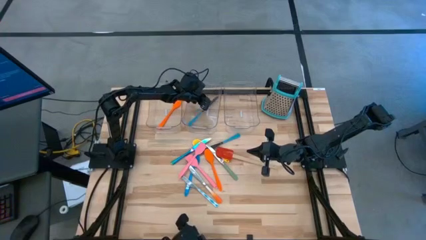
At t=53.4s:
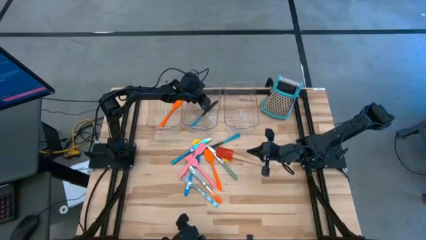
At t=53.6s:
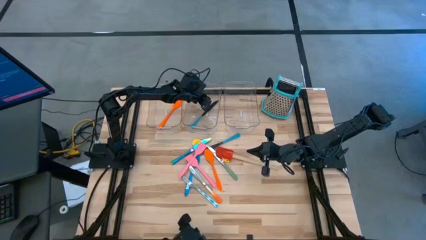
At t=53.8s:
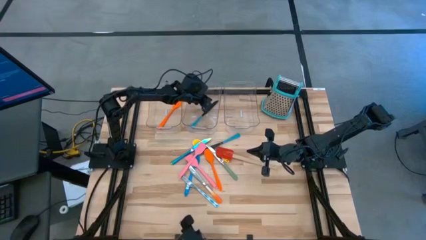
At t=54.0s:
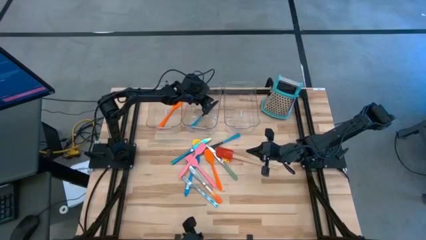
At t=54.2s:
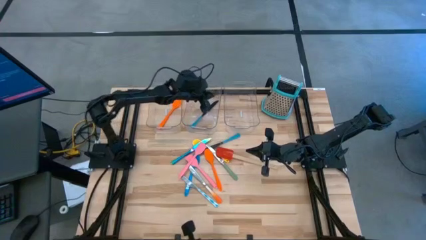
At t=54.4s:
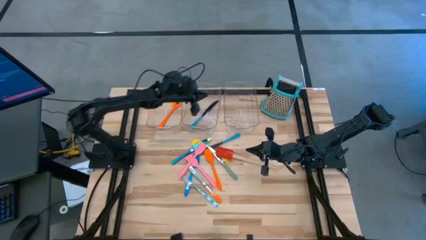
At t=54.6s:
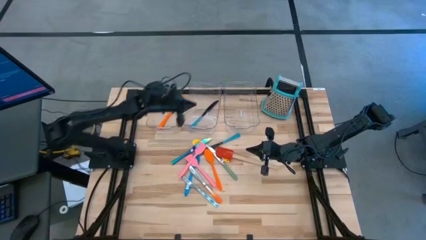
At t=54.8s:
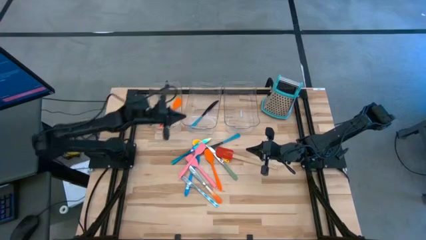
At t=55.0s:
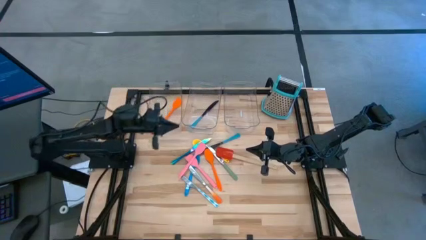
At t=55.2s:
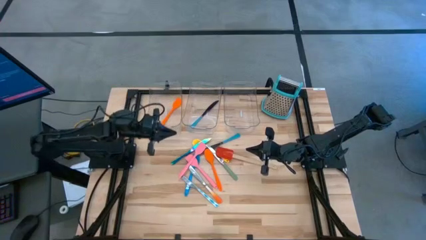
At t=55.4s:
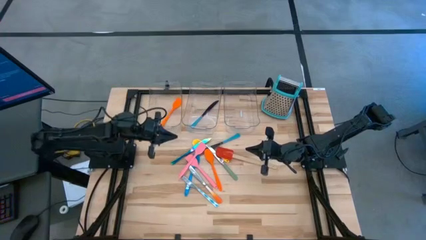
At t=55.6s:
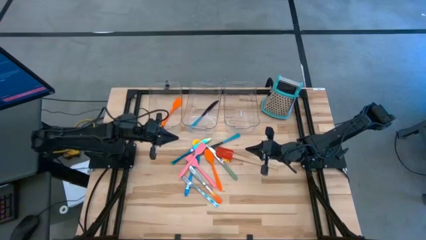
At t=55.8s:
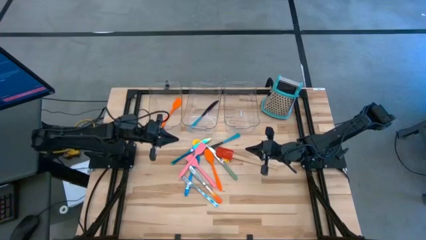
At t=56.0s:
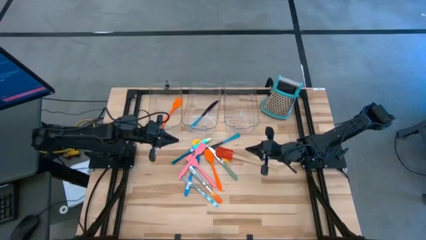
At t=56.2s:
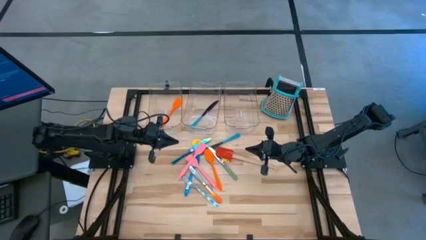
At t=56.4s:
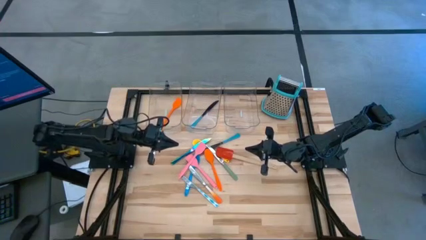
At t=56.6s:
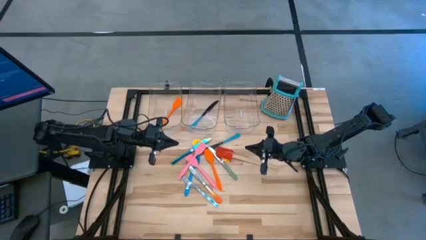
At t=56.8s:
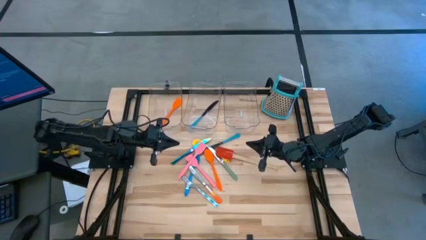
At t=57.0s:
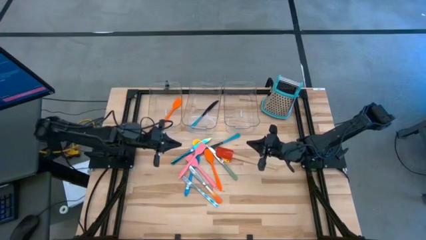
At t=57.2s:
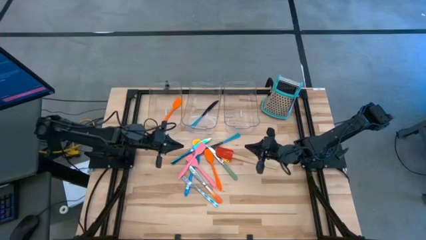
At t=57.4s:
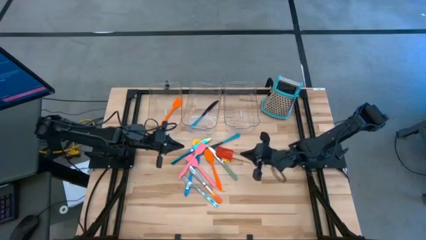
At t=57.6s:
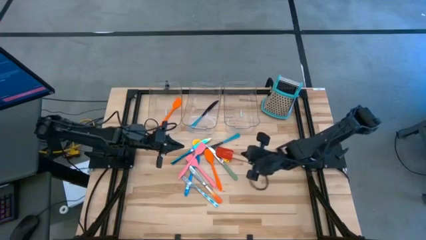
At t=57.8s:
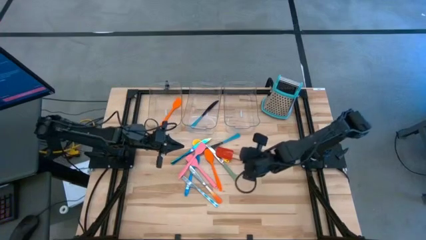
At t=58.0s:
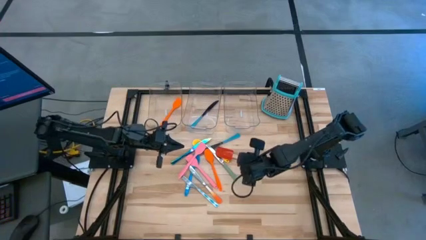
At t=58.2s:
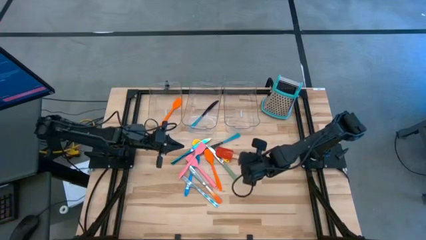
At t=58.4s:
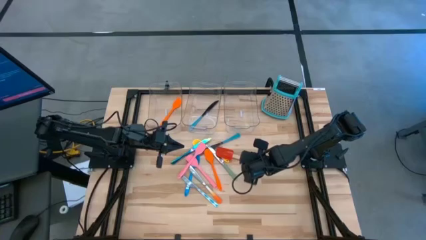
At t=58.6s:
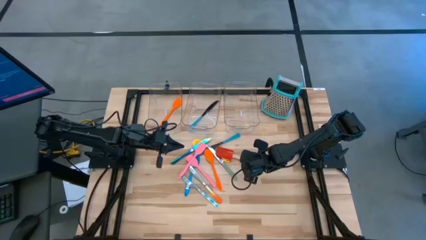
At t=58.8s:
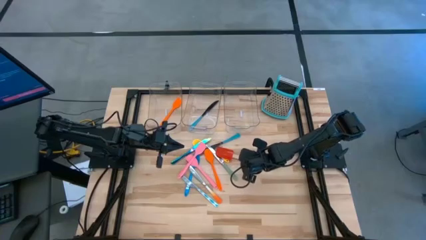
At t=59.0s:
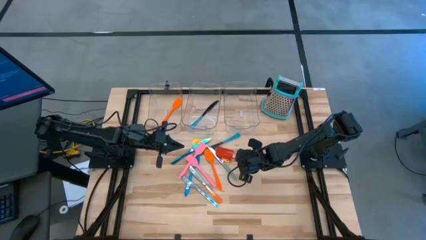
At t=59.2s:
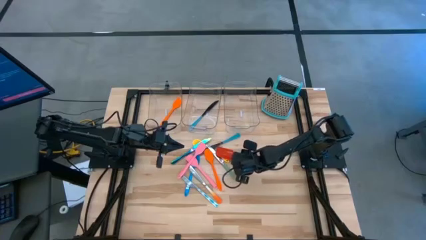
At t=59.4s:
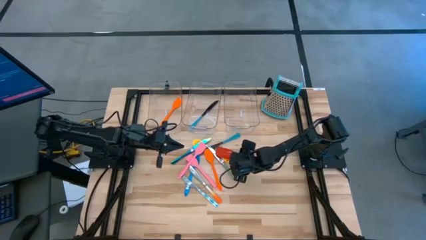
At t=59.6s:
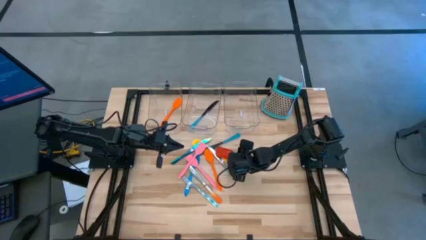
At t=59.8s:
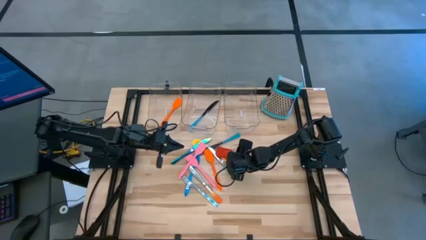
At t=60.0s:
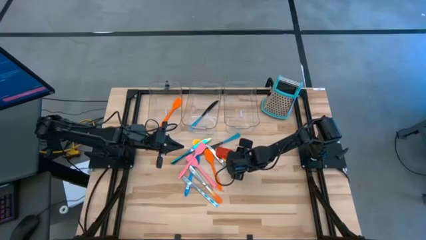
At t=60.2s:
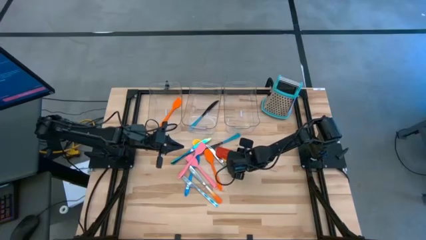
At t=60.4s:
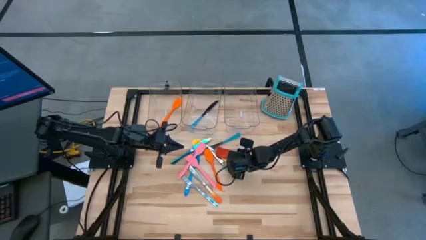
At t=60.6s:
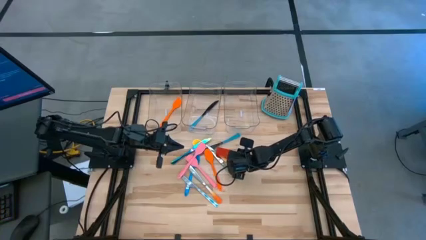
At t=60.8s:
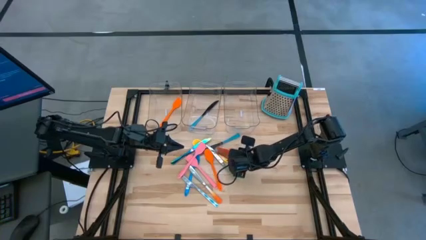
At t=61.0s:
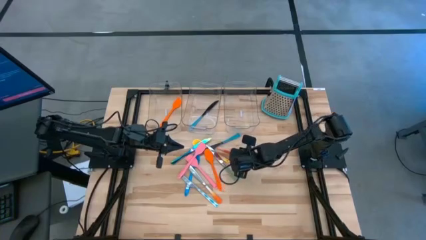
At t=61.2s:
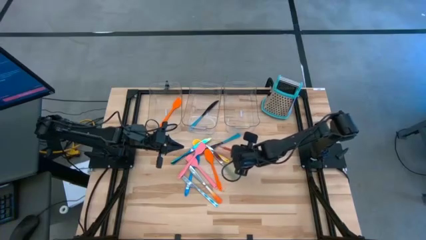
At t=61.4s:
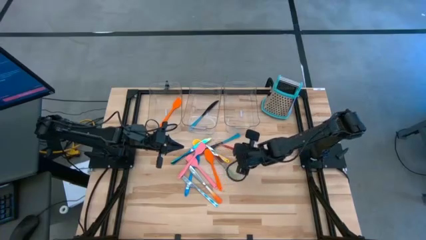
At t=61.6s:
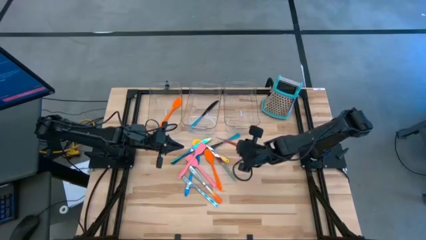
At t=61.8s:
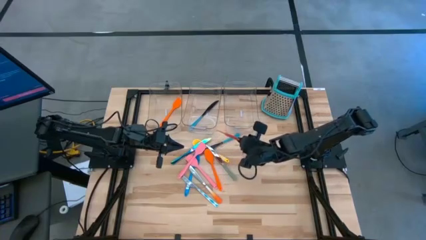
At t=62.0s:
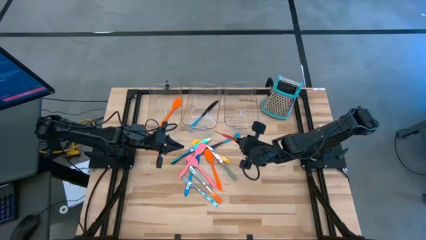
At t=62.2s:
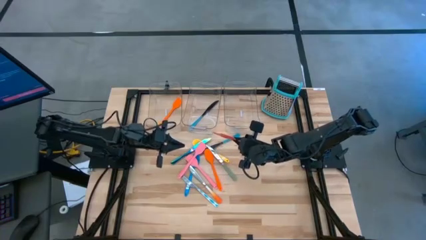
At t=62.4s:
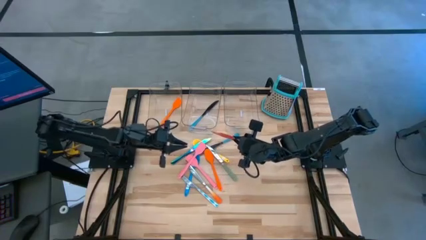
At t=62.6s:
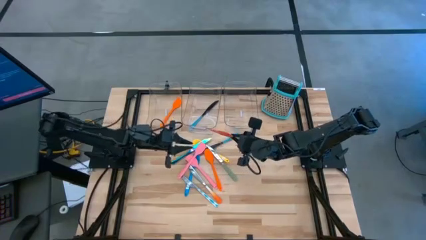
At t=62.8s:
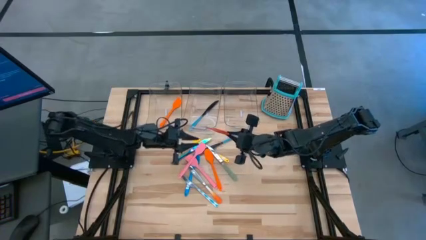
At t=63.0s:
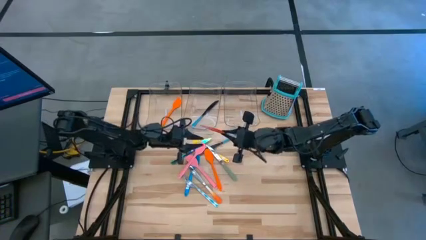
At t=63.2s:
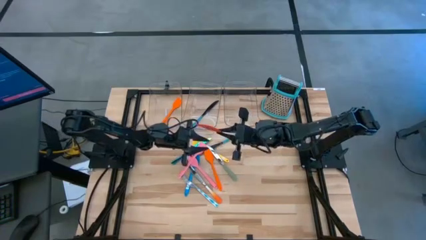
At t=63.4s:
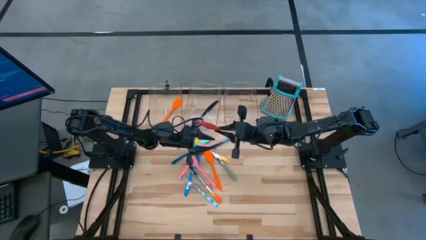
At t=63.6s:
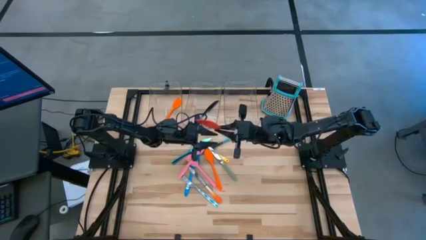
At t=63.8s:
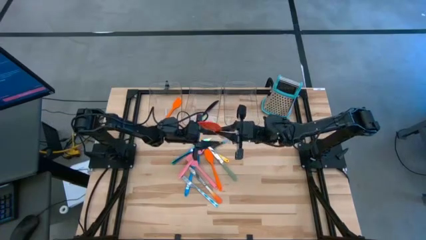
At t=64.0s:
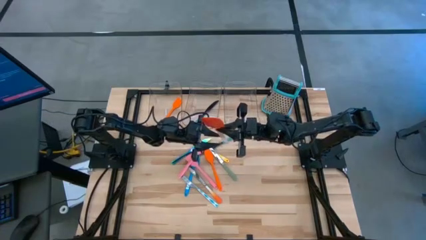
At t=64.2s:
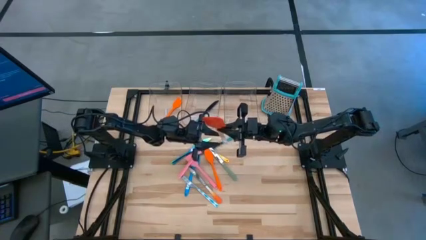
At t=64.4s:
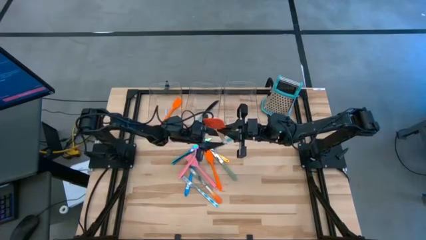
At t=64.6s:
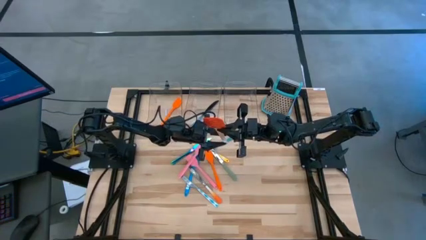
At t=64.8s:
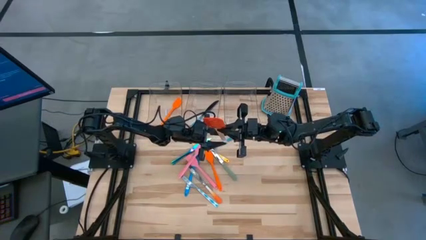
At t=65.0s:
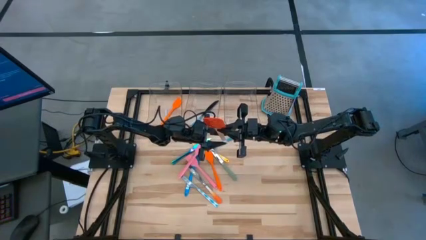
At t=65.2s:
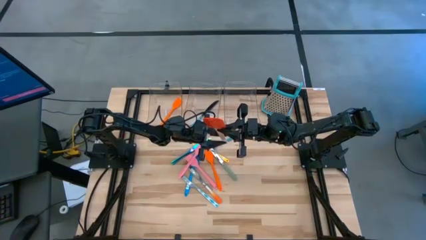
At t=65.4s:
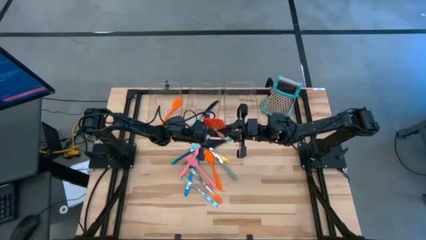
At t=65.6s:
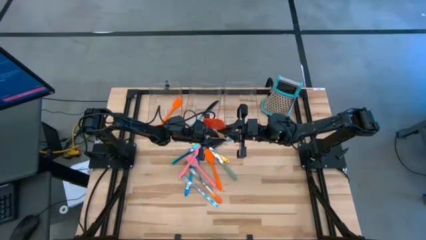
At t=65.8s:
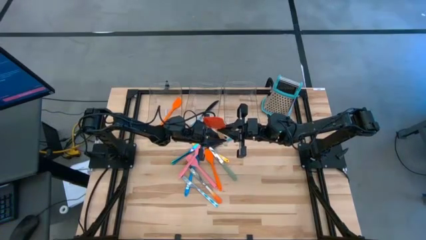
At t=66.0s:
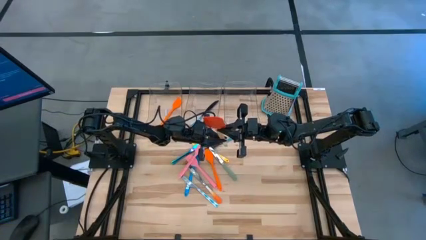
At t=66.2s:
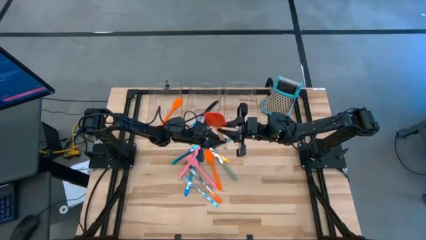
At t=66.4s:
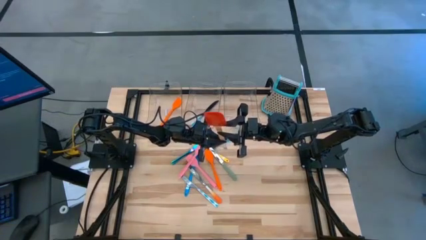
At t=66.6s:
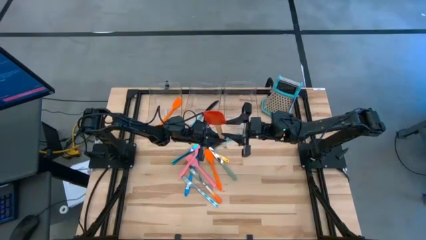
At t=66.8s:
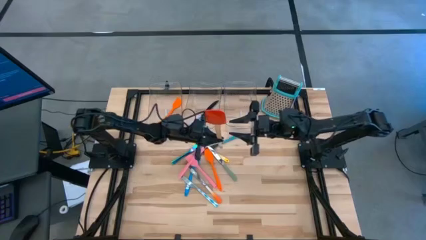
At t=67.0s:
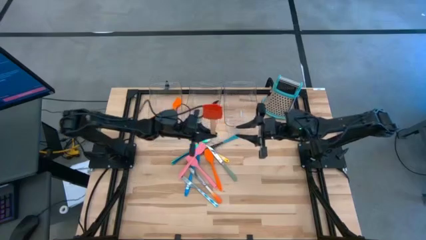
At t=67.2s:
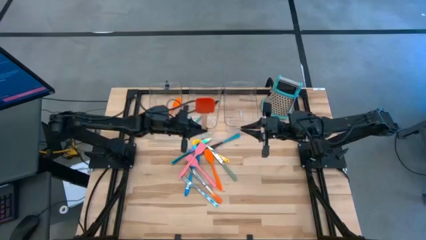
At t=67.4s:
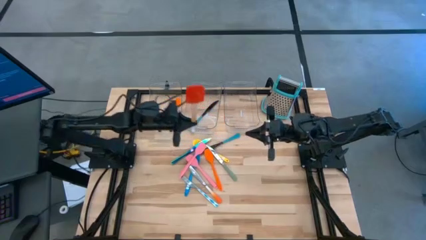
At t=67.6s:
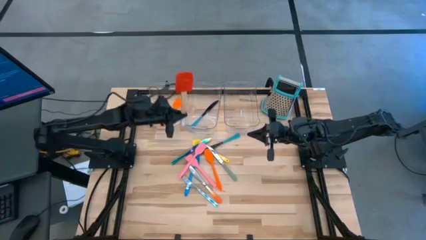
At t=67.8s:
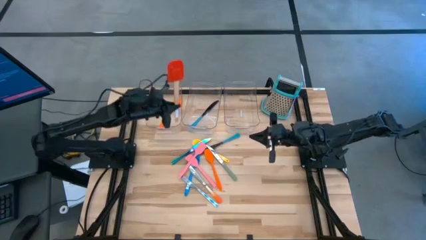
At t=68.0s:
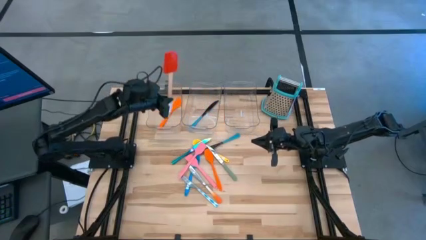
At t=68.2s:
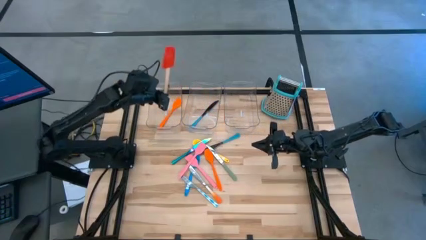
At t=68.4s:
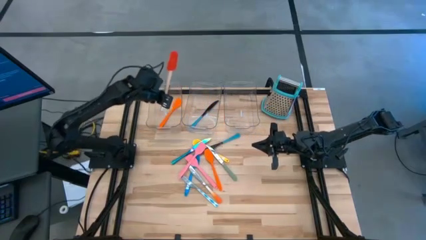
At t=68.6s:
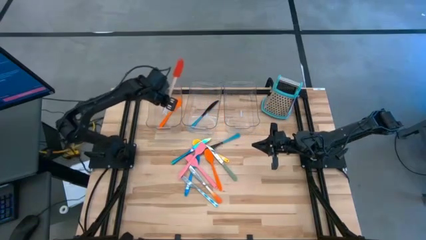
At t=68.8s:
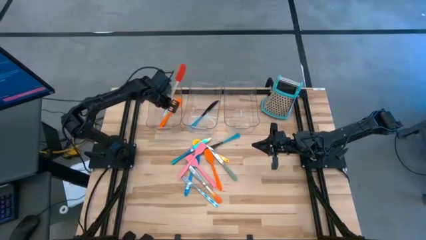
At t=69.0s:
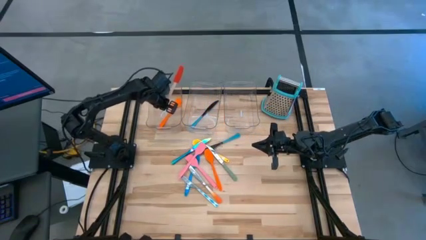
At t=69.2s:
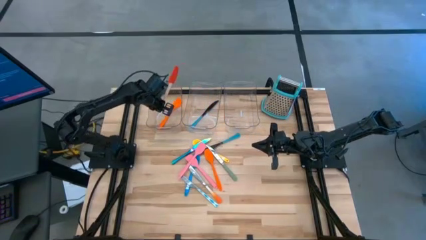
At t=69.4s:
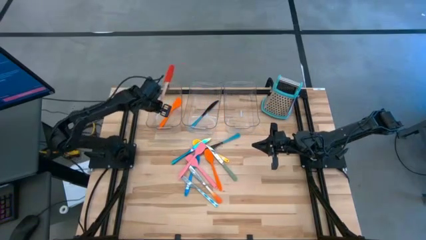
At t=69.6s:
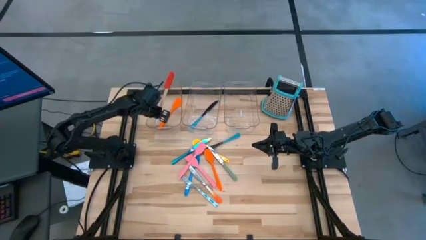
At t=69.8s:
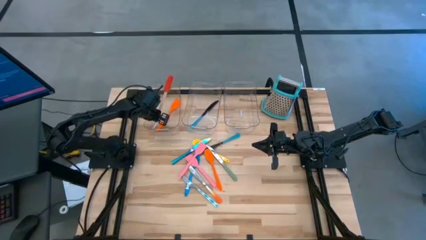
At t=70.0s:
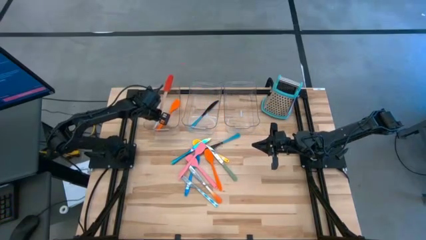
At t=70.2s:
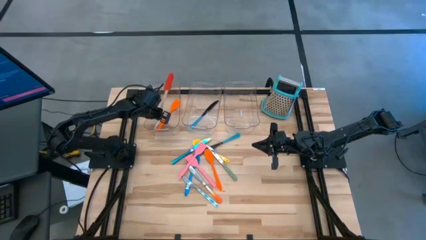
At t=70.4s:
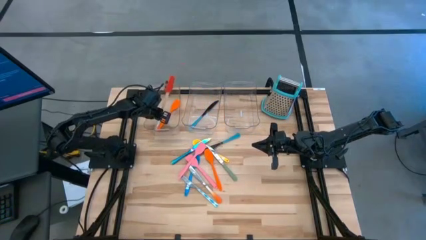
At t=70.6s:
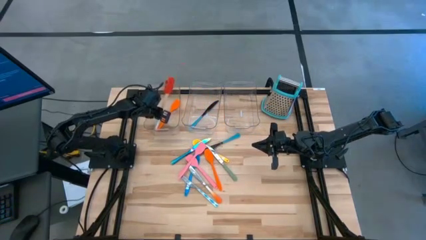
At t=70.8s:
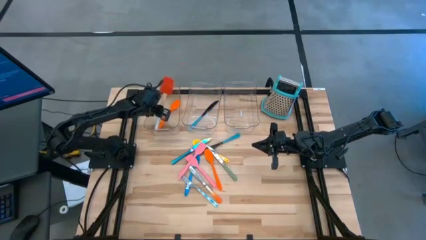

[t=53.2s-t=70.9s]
Task: Pick & Place Kitchen Items
Put the red spatula into the left transparent bin
